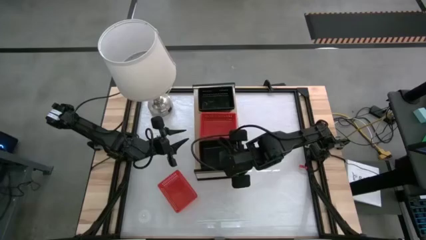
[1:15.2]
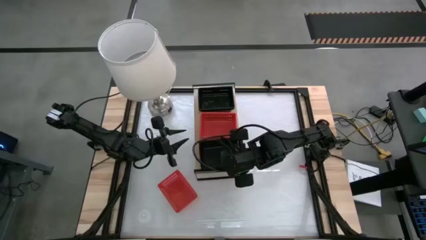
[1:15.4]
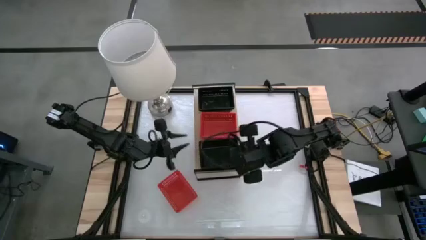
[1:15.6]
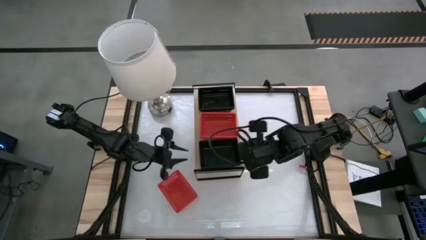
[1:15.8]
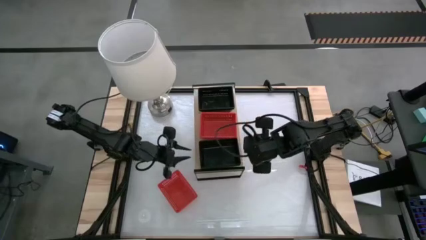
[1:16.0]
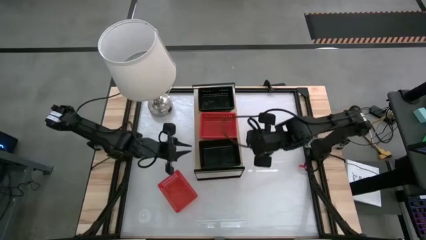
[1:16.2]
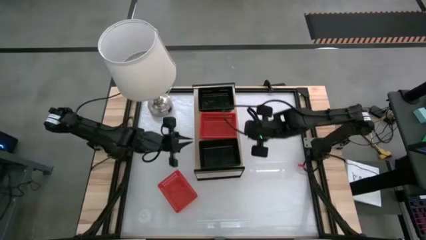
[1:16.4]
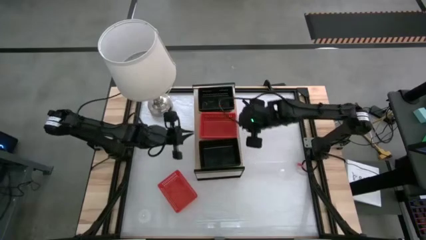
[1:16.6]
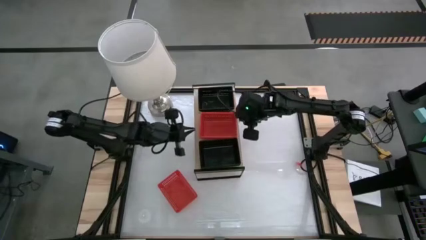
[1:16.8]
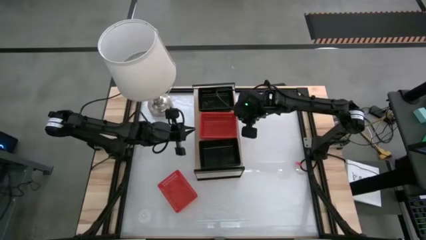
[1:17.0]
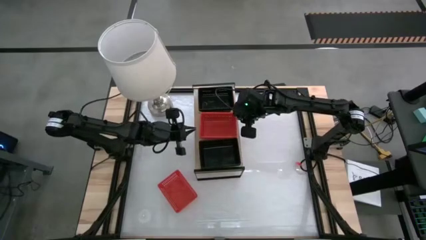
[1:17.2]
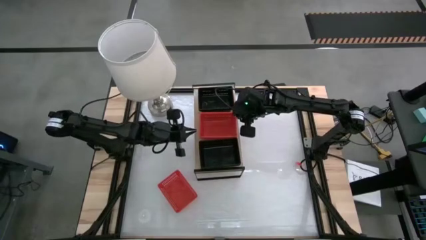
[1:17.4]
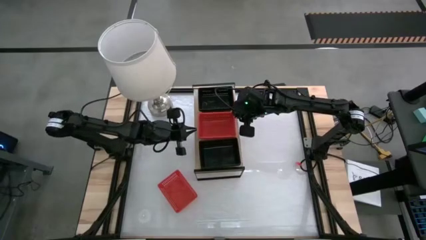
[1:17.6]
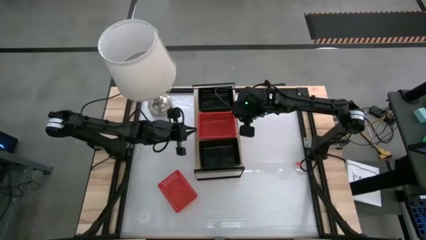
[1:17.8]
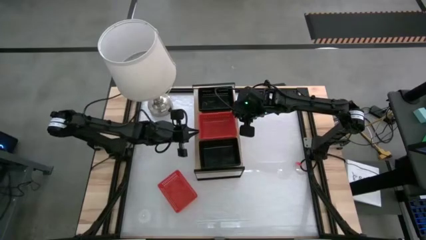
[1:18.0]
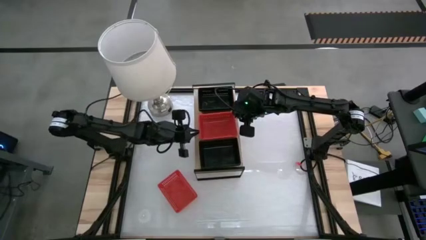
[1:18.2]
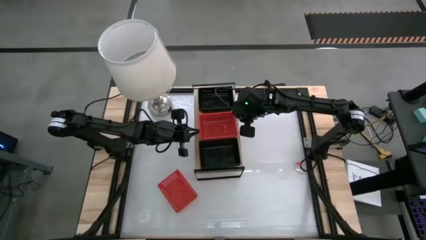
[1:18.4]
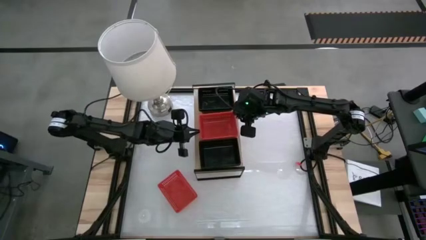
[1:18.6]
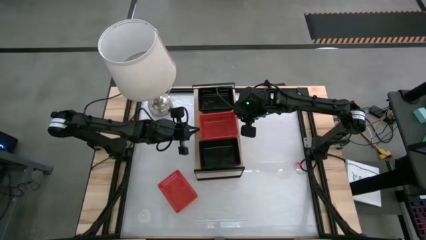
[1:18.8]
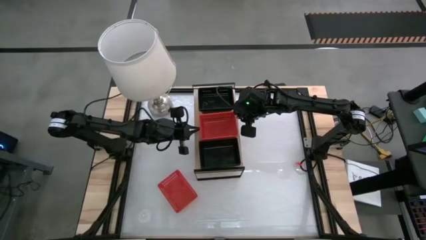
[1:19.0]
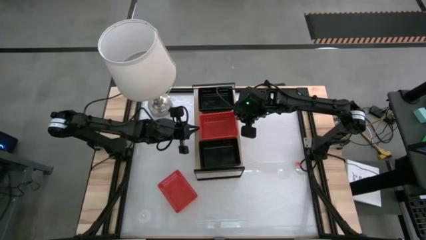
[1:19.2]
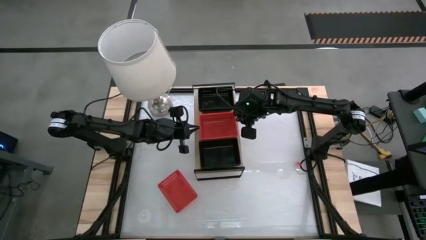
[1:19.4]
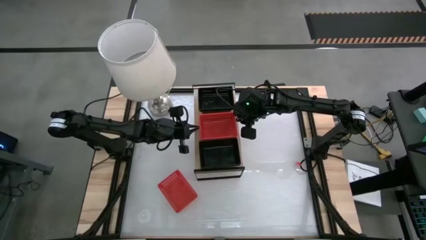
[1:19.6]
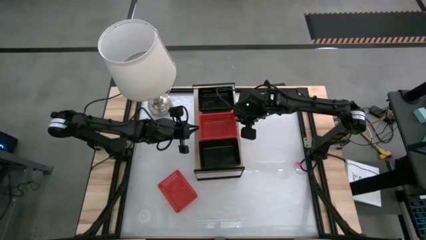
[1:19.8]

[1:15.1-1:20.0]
Task: Stack baskets on shelf by color
Adjust the stacked red bins on the shelf

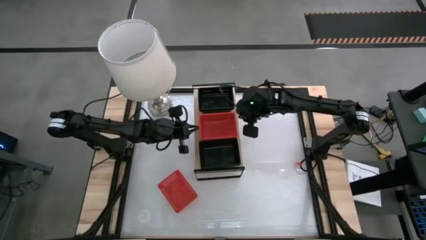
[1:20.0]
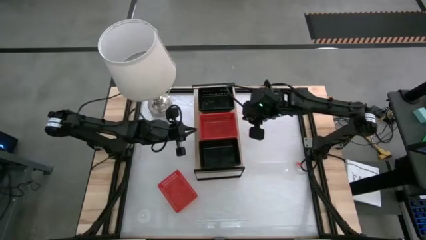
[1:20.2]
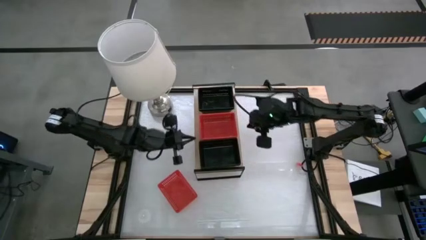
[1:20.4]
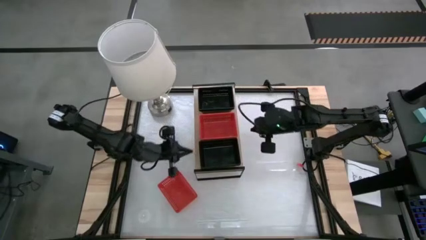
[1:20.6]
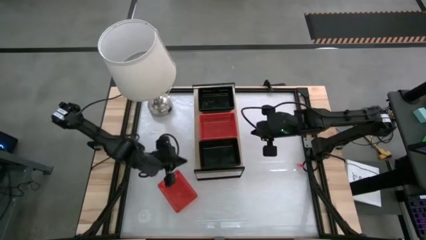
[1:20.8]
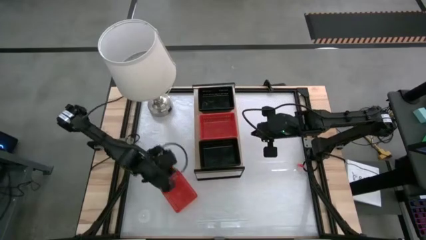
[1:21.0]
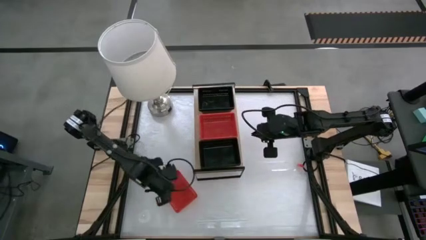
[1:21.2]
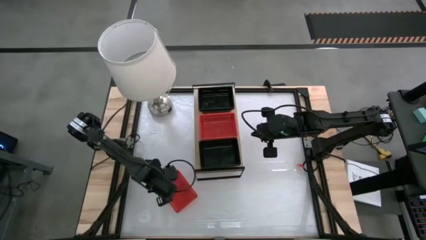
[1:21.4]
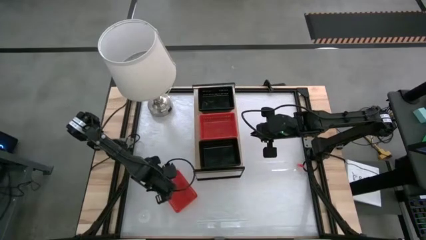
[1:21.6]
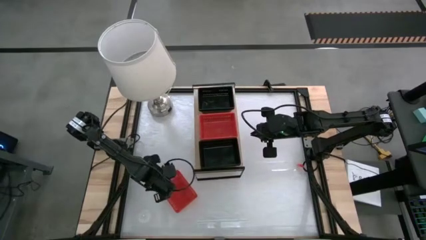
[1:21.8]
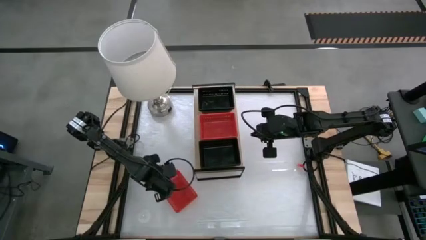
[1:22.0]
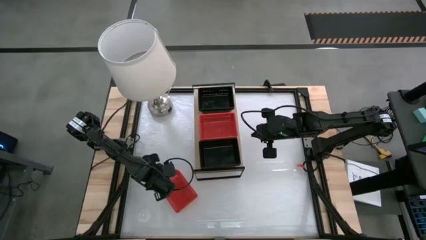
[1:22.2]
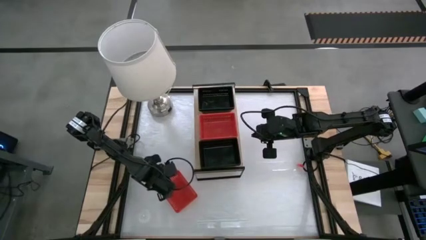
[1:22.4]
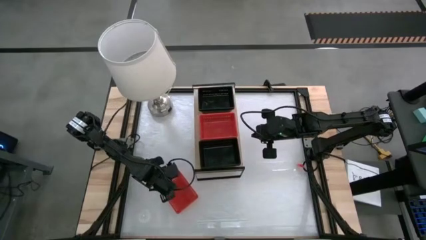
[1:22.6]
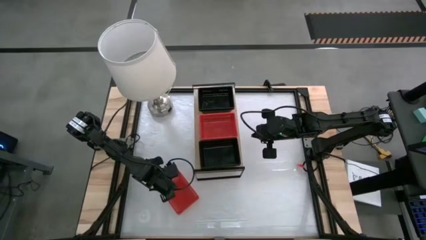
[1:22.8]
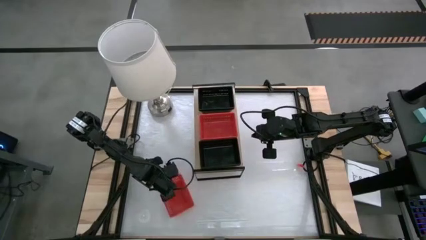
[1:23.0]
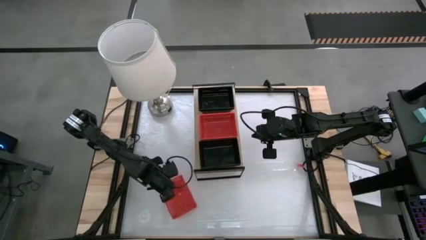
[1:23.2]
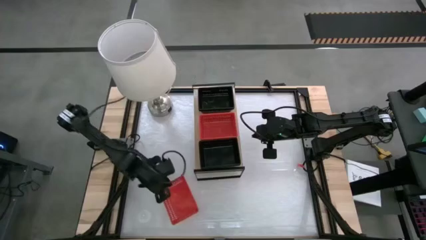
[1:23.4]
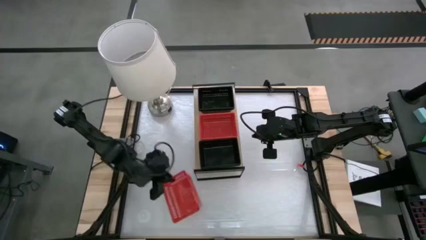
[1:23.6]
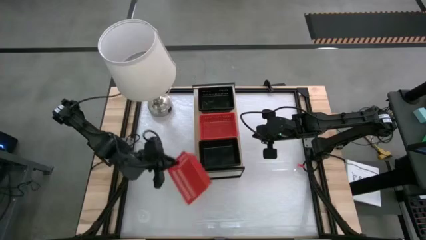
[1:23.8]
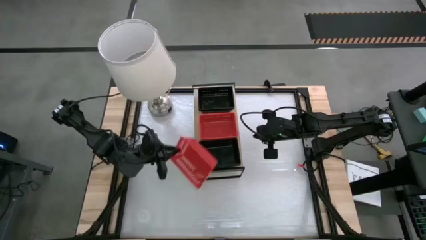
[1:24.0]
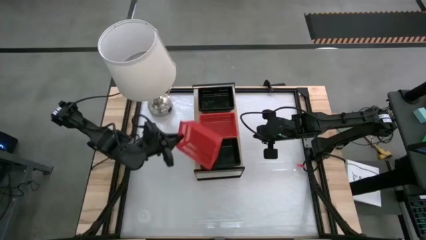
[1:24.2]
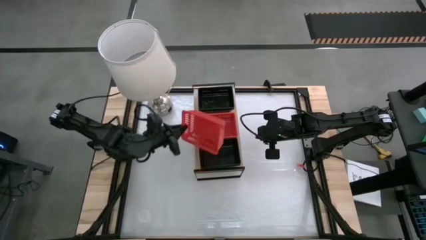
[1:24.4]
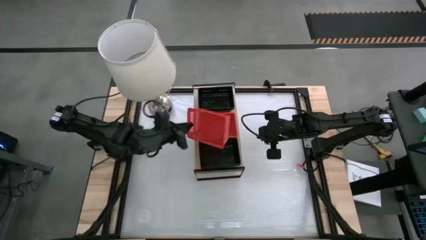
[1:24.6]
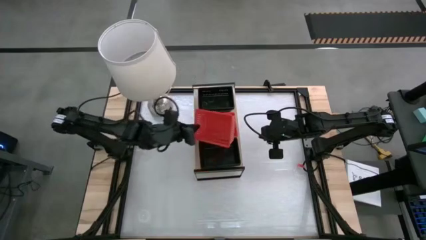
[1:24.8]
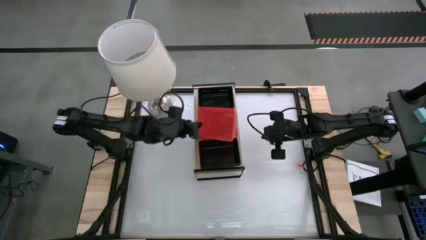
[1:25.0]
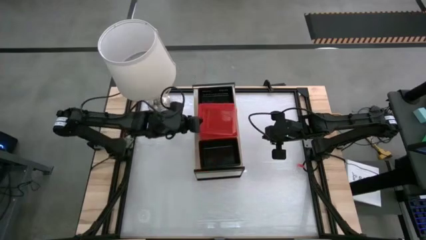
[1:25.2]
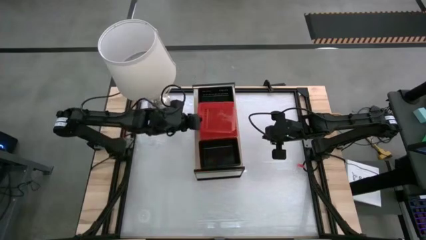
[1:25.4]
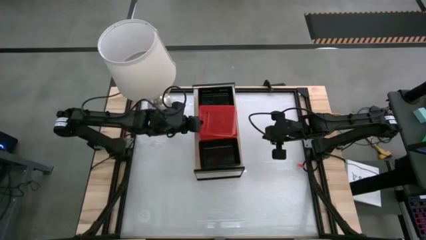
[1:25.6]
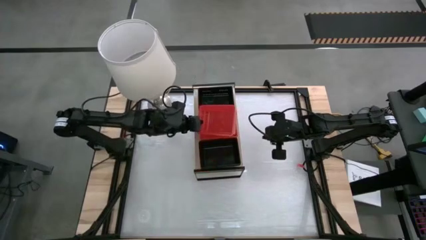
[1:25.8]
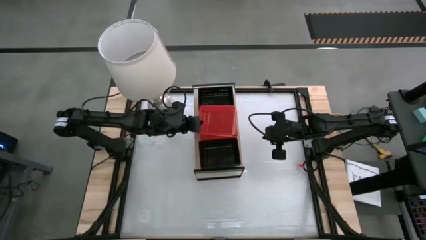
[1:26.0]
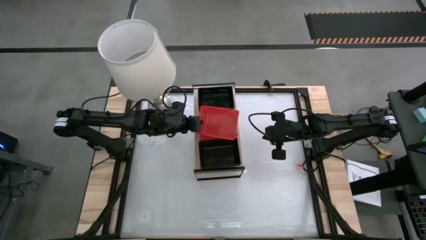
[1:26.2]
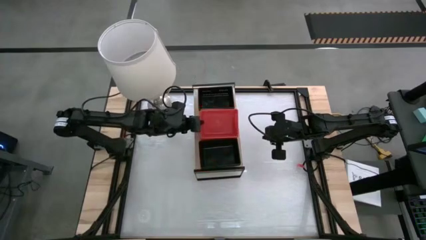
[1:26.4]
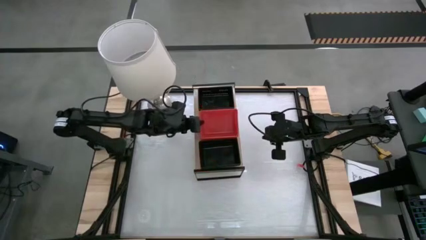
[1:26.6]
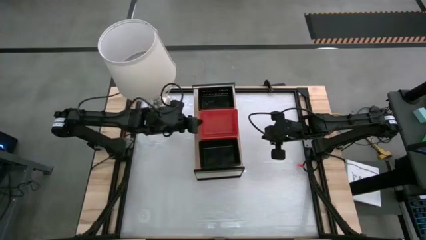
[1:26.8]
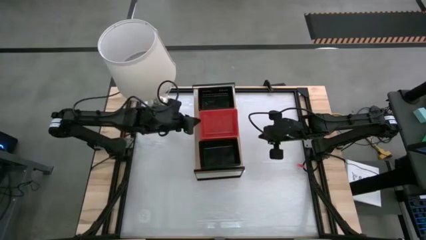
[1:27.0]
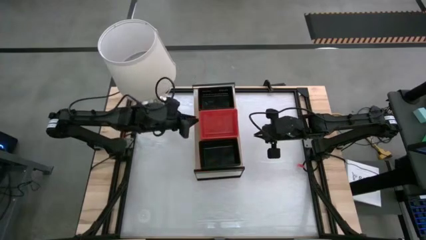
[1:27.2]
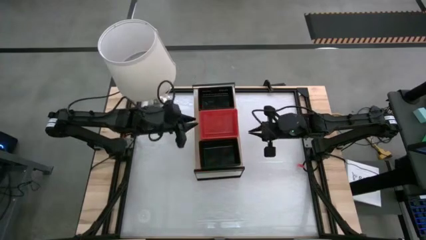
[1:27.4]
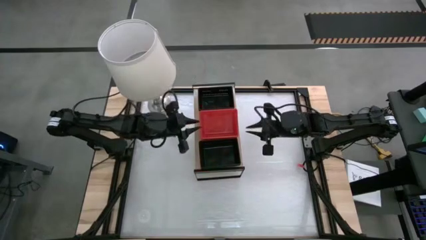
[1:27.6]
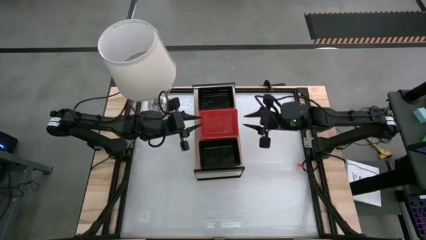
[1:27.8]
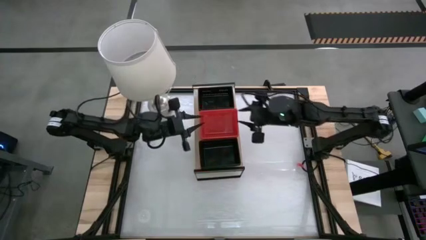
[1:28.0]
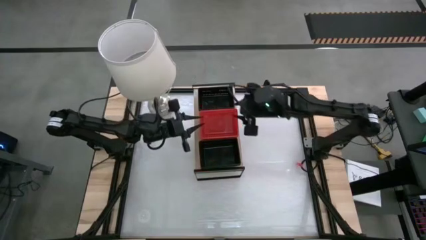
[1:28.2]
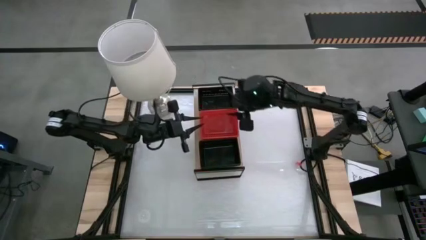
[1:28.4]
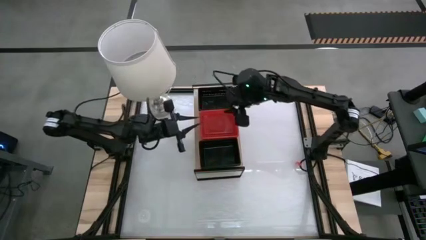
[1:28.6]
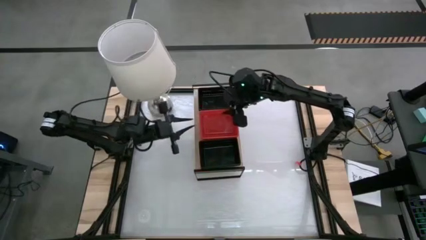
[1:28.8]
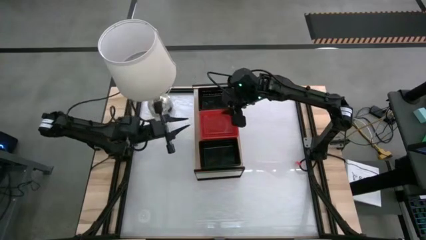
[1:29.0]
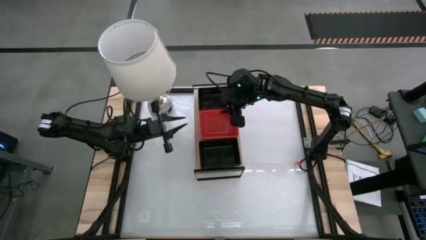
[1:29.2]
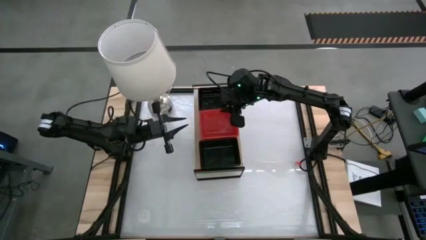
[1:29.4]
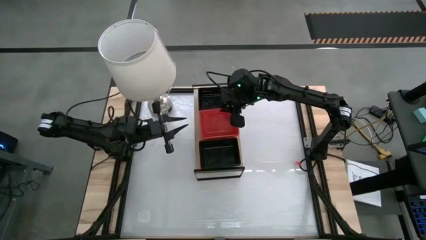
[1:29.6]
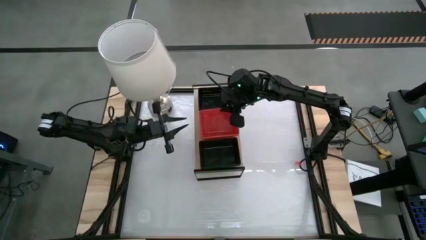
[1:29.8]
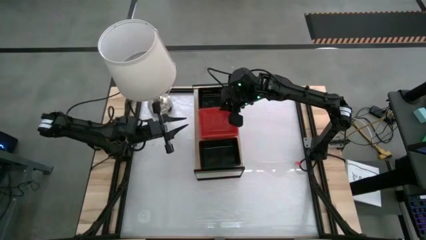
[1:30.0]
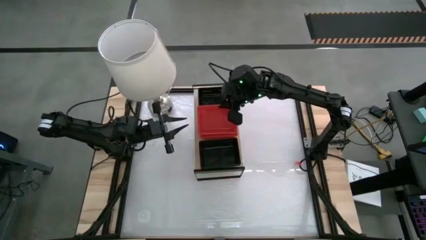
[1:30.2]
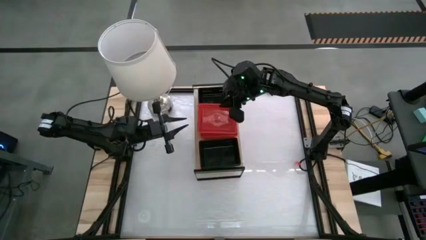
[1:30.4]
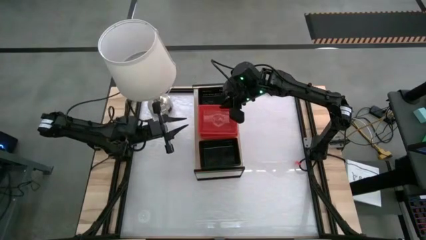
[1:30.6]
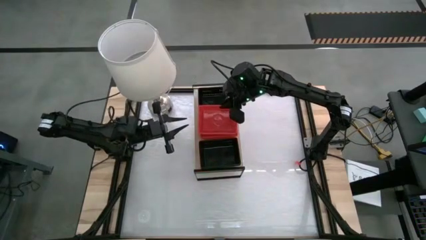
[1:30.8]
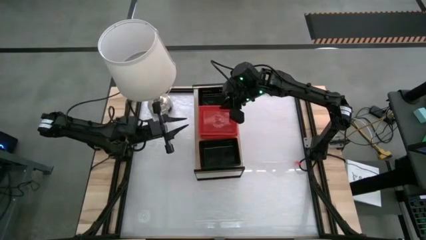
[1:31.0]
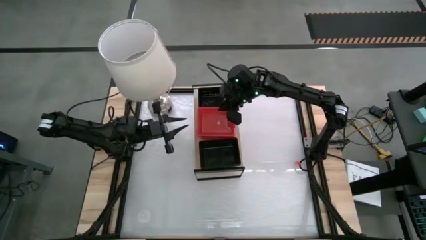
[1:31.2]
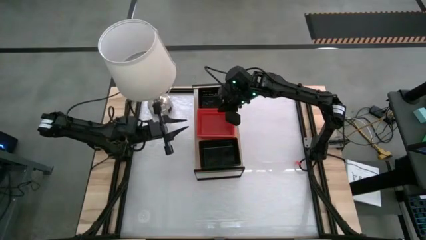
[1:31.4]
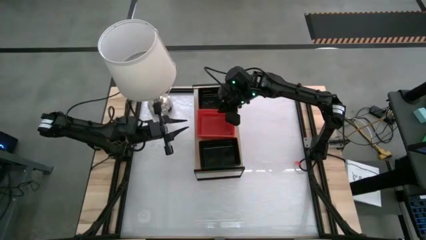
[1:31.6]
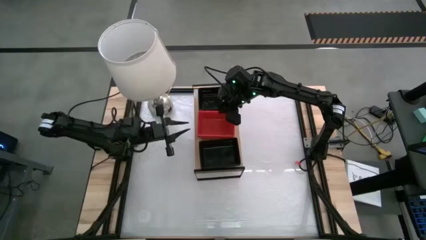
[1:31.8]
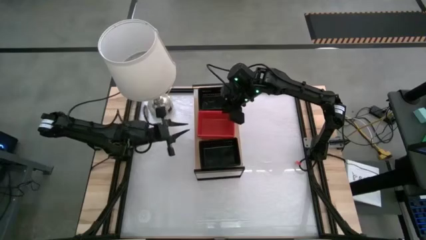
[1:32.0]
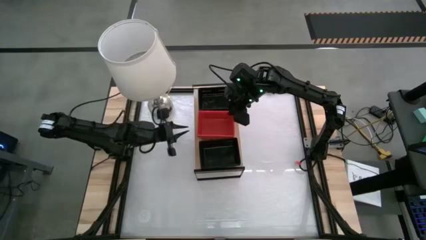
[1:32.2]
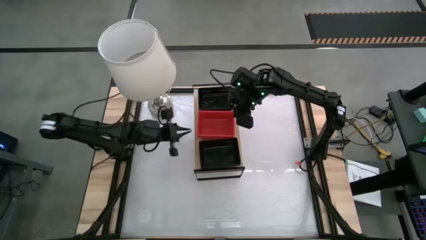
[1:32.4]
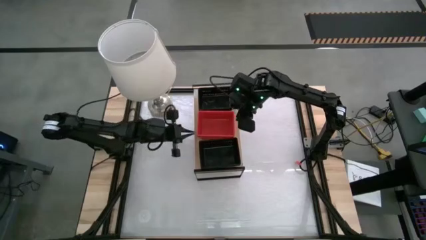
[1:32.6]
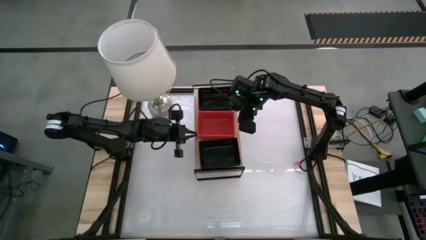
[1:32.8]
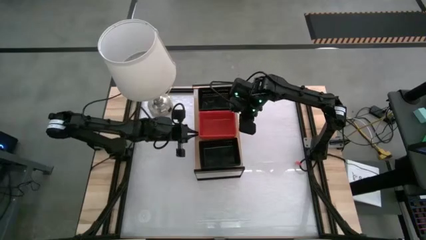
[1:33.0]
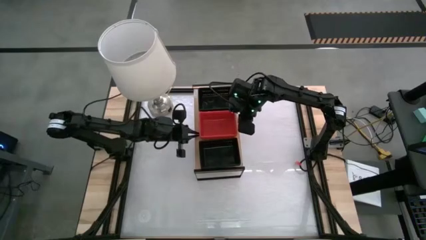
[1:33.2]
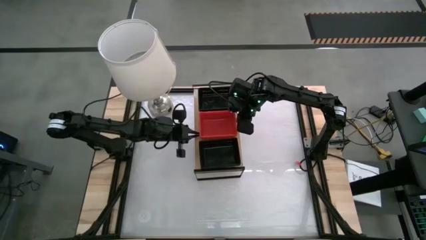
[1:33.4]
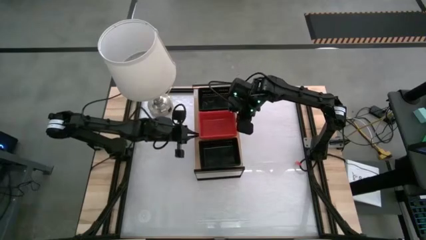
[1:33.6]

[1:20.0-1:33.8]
Stack the red bin on the red bin on the shelf
